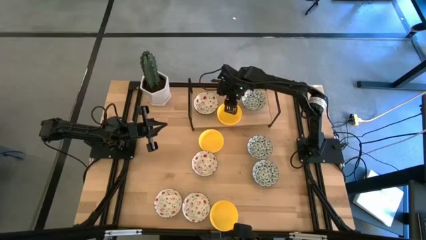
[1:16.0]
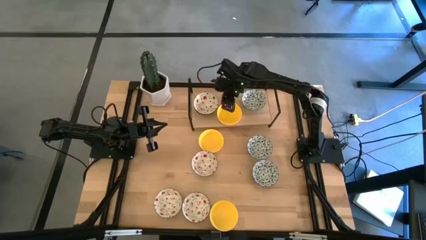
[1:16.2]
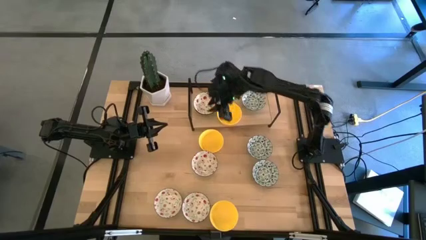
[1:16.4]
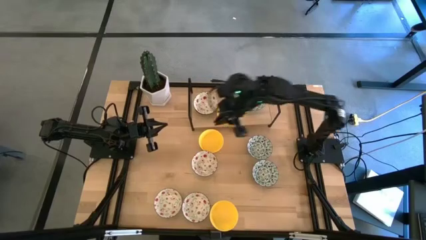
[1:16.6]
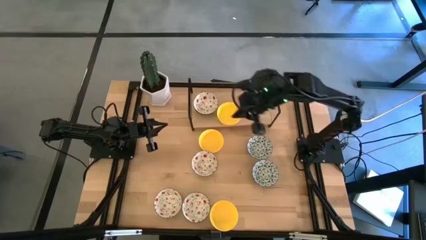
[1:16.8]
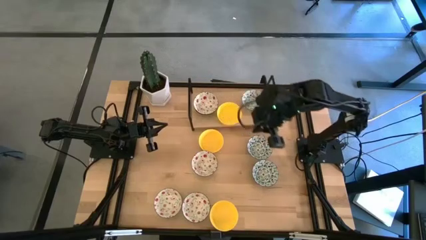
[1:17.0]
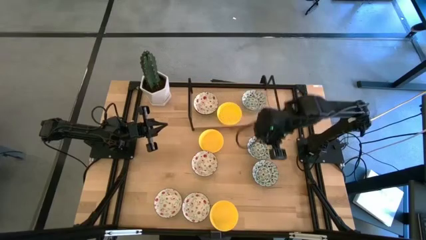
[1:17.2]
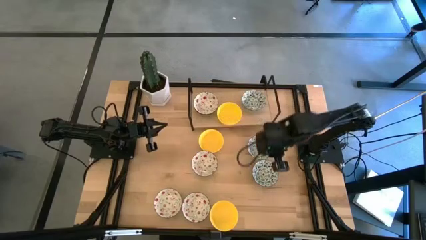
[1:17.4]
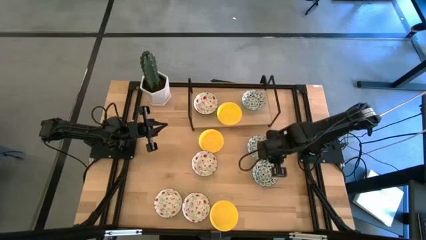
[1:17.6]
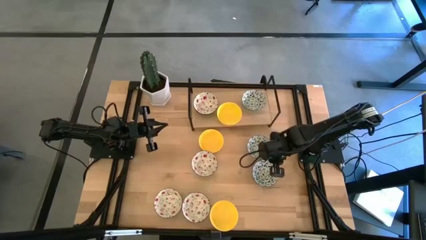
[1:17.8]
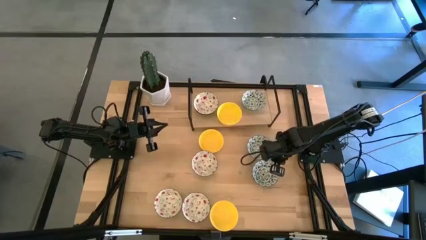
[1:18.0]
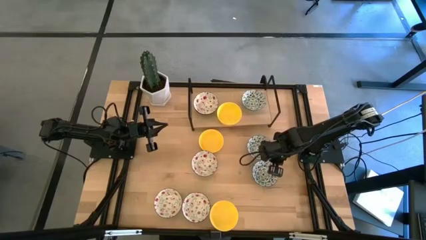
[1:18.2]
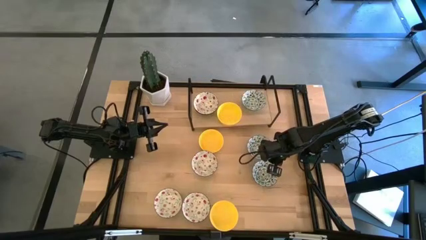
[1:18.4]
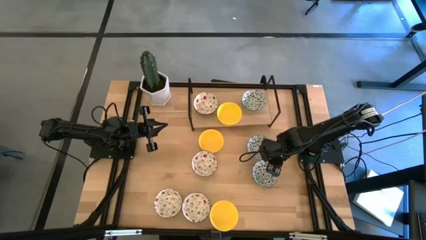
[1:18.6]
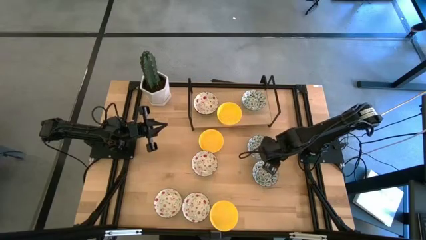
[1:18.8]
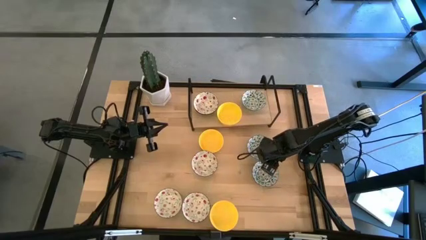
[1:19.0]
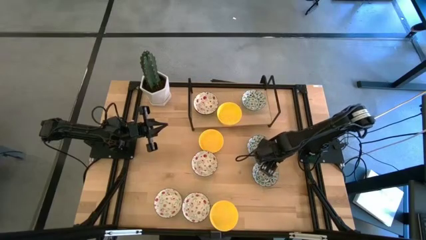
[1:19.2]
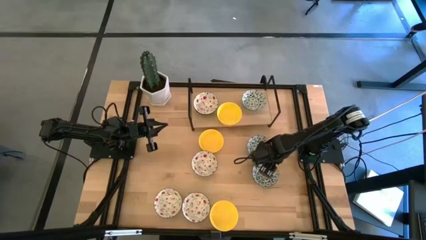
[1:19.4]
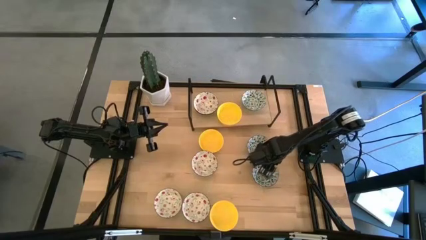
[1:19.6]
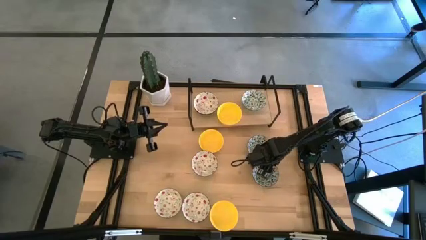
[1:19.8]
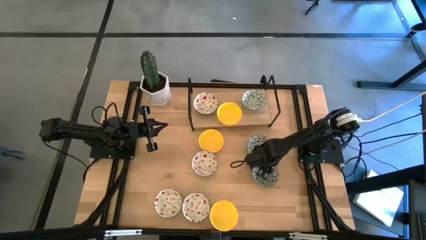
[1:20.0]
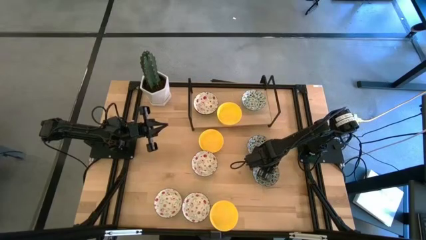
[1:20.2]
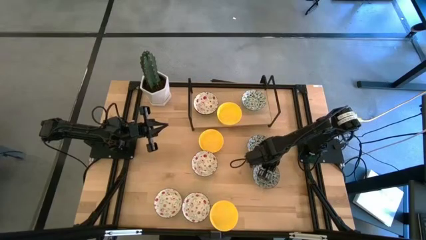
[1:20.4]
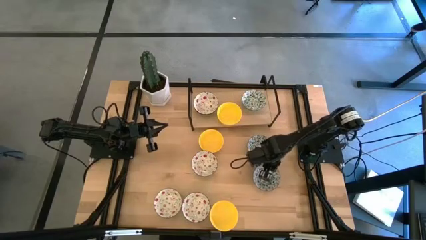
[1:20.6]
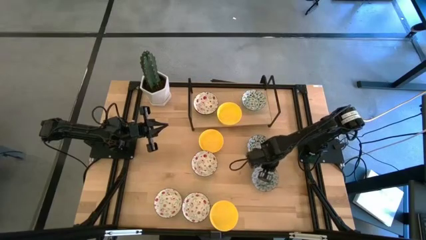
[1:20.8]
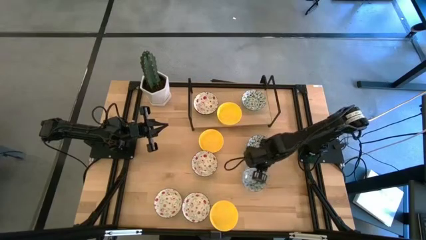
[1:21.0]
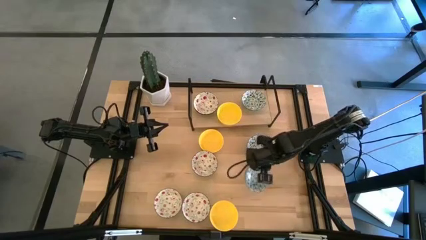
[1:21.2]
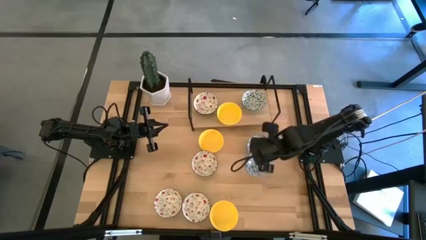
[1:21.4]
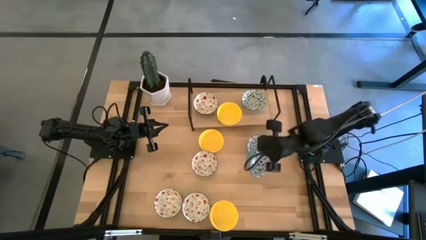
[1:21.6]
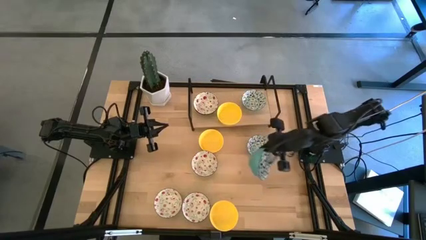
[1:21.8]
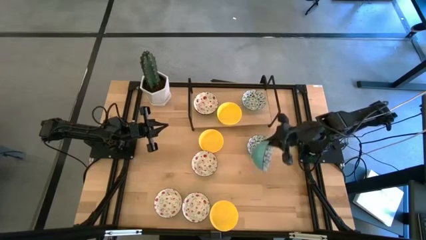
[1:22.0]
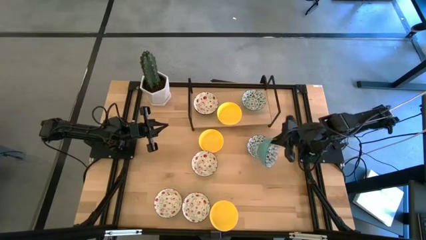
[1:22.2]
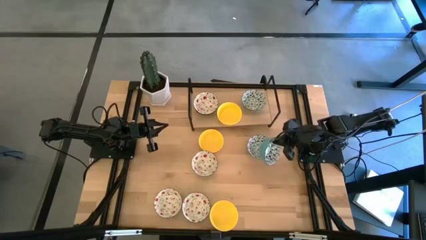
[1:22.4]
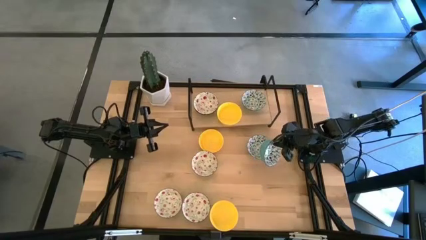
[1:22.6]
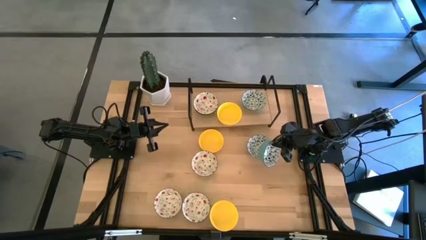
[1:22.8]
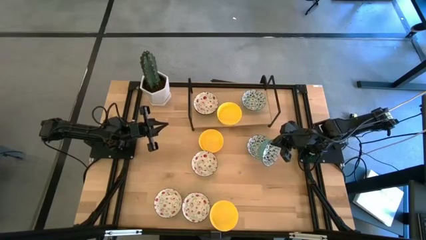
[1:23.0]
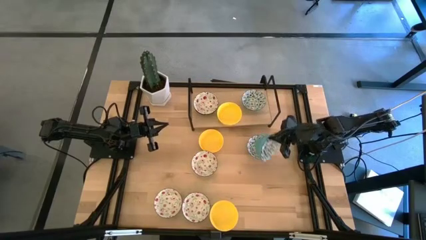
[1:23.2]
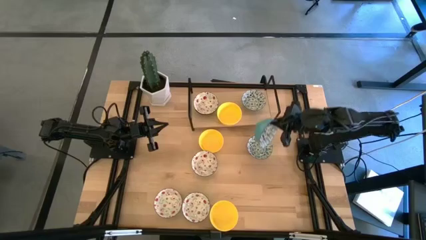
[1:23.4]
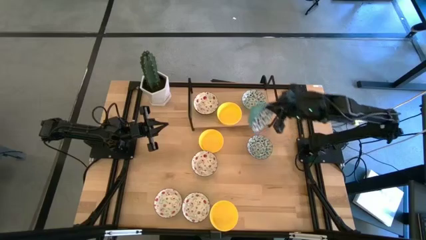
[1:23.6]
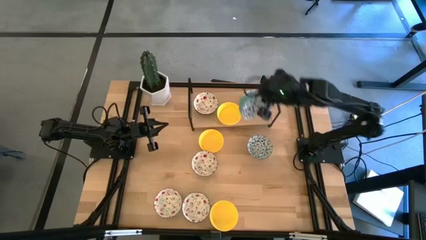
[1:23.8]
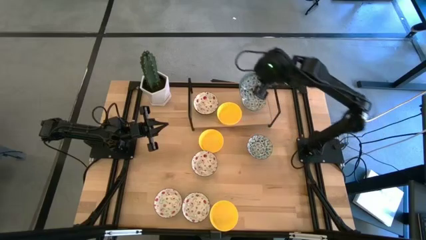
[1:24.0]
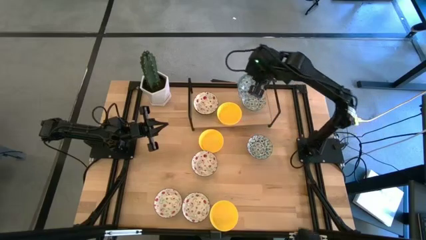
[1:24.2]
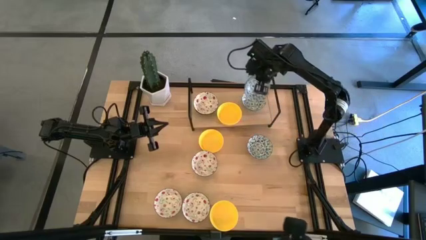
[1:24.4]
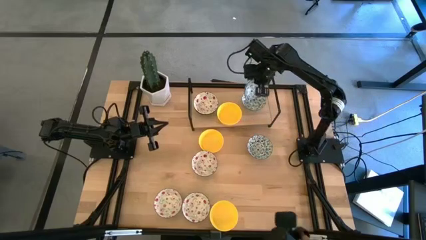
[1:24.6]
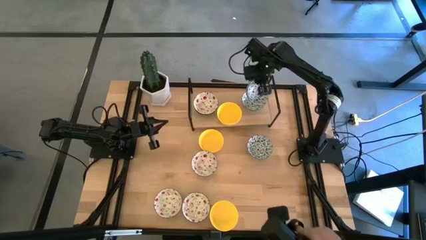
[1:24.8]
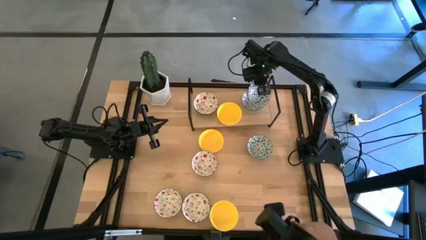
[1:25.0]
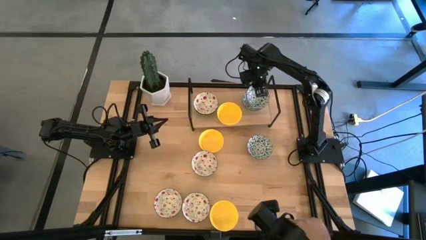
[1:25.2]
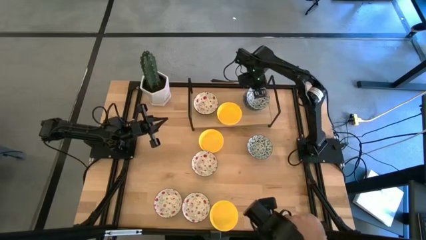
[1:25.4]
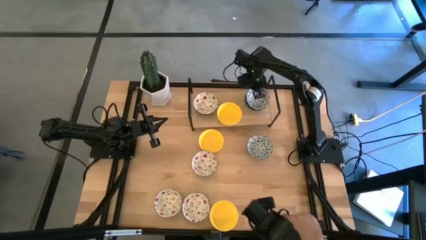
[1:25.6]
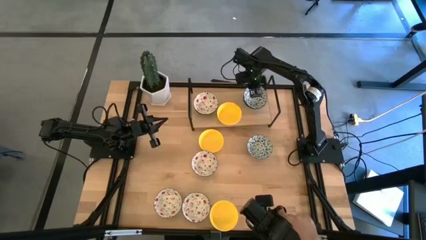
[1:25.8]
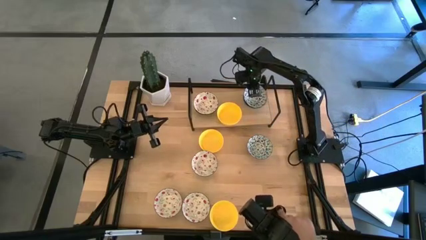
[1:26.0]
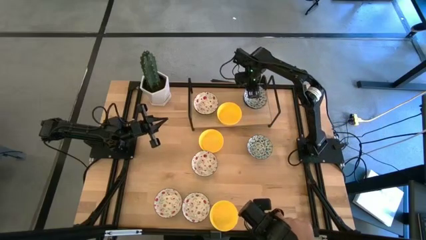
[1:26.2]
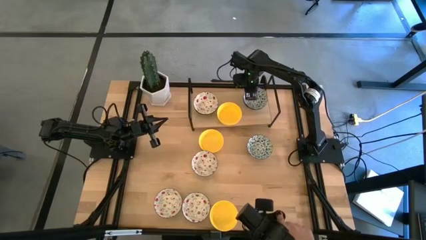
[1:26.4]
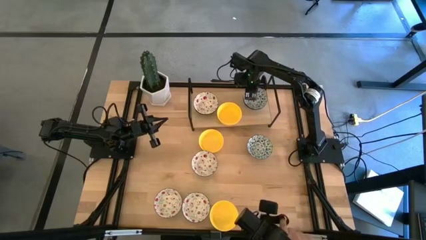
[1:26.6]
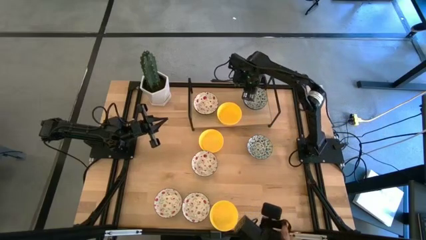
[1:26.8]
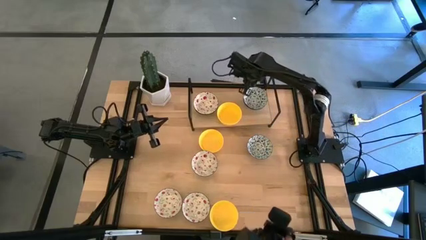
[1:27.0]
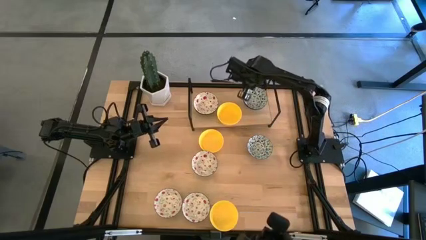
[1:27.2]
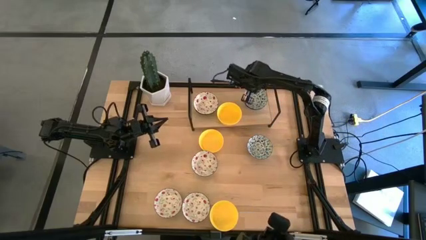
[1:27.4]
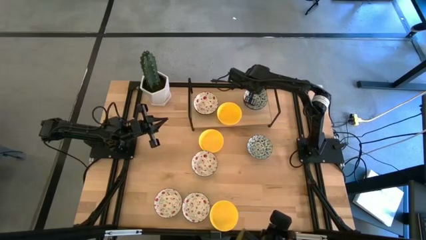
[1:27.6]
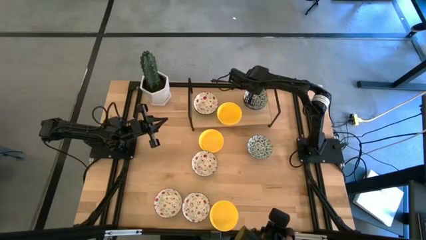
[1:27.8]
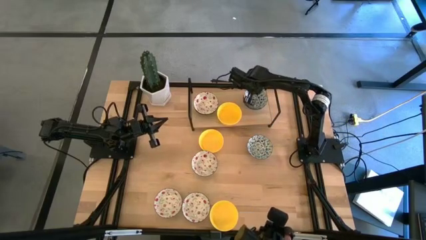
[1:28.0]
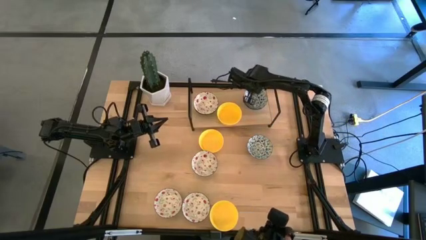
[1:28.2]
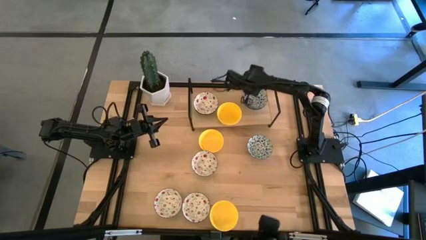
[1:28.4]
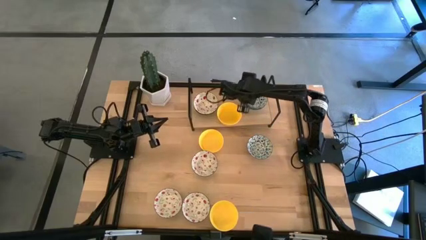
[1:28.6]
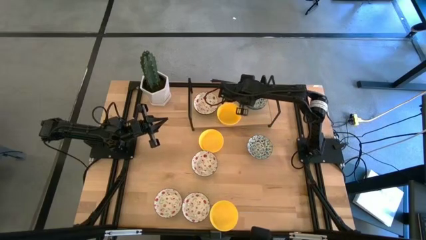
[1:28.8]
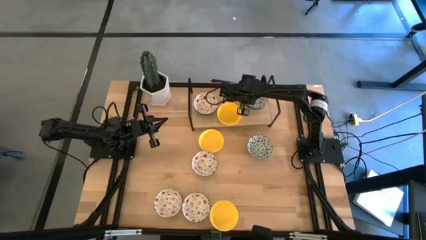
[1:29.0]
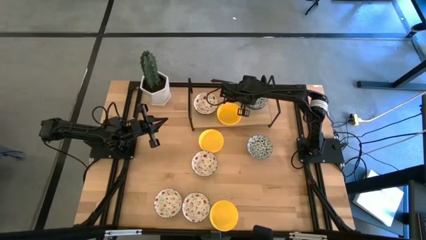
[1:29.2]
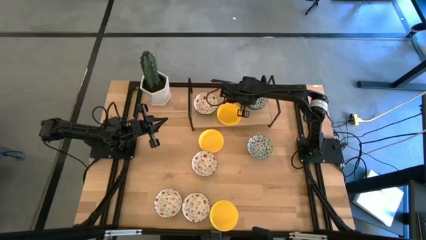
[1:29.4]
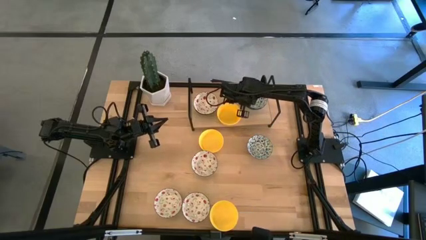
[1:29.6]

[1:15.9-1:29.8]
Task: Pick & Place Mini bowls
Stack the blue patterned bowl on the blue patterned bowl on the shelf
